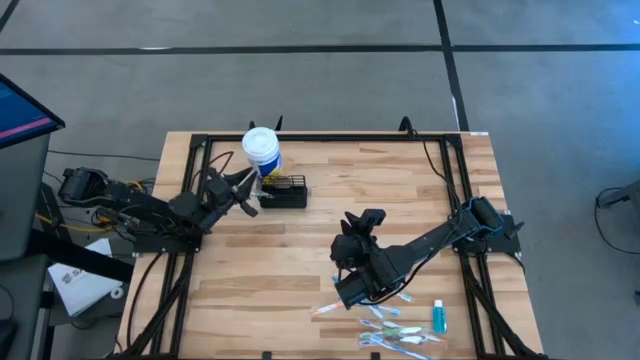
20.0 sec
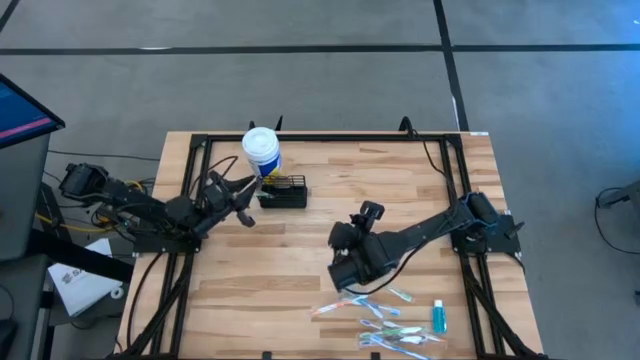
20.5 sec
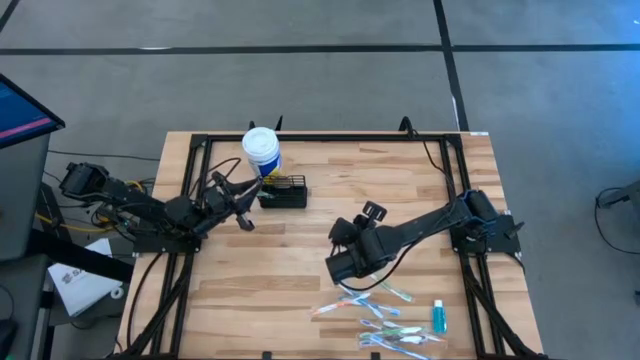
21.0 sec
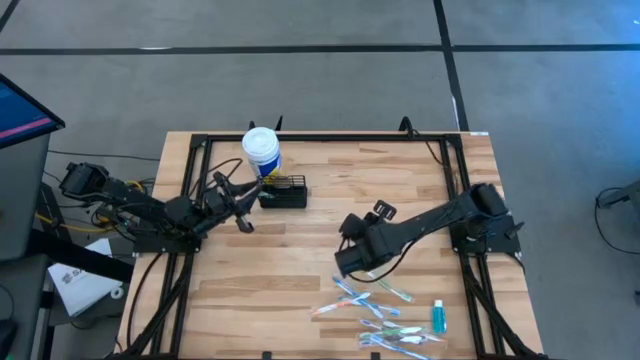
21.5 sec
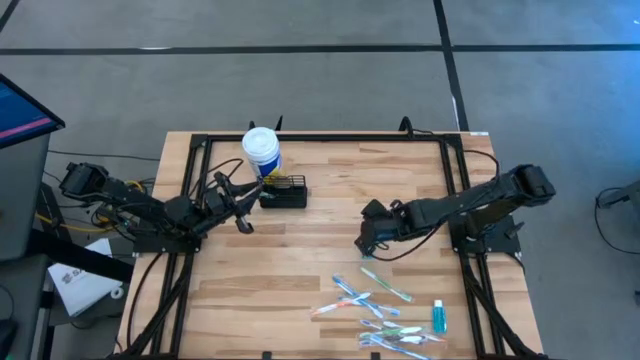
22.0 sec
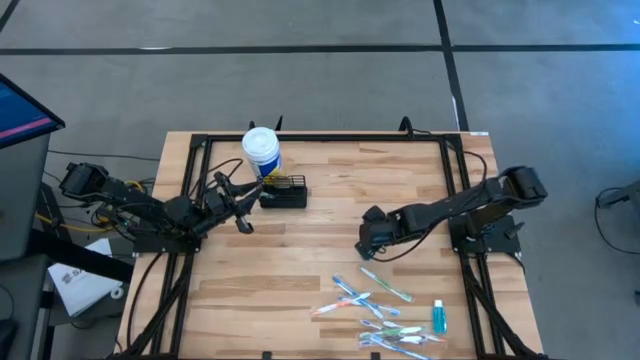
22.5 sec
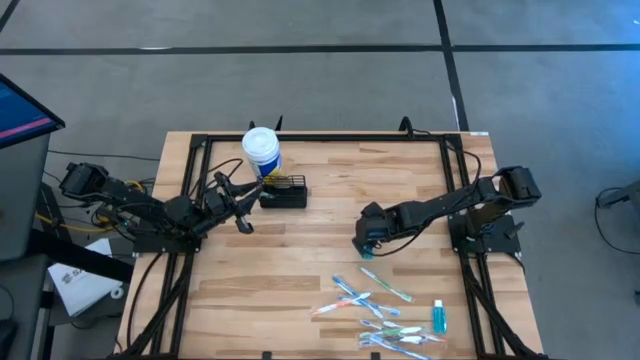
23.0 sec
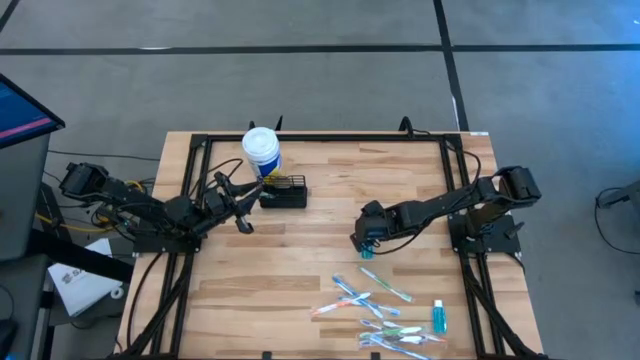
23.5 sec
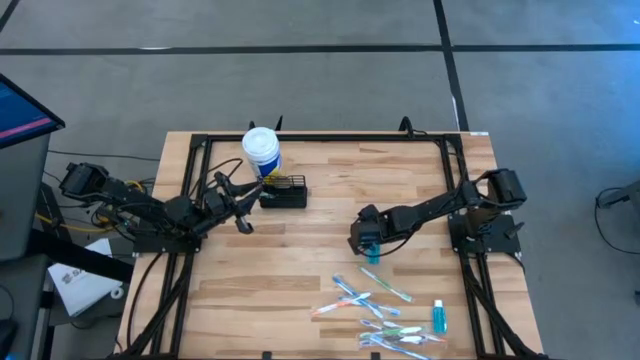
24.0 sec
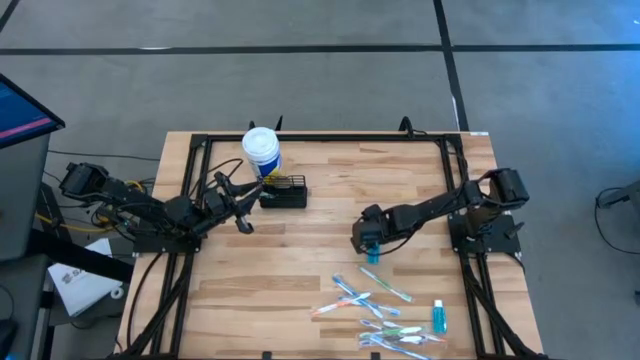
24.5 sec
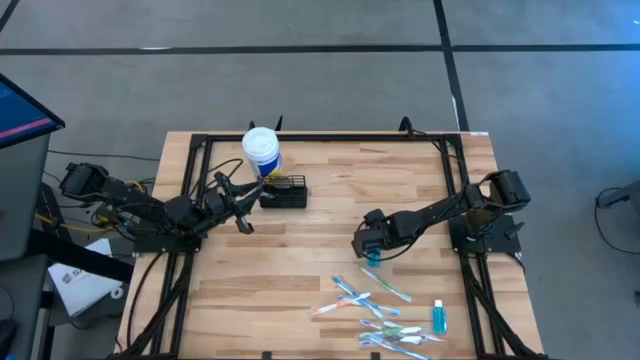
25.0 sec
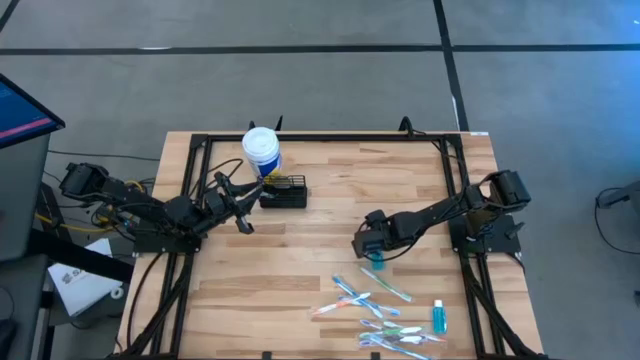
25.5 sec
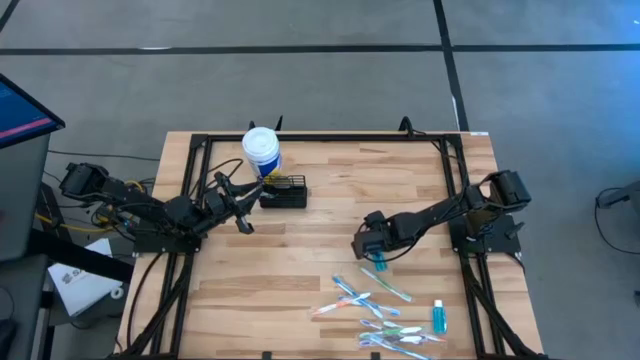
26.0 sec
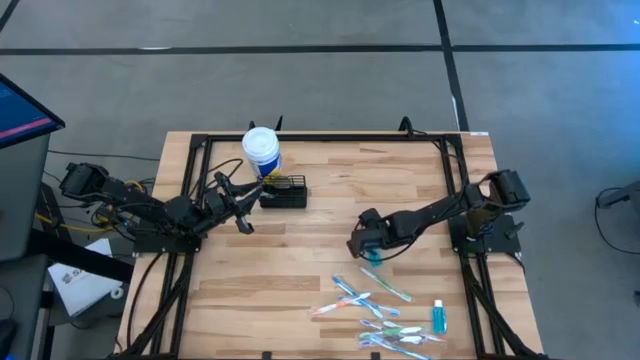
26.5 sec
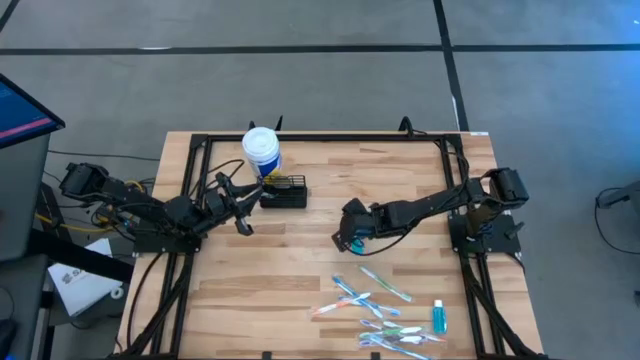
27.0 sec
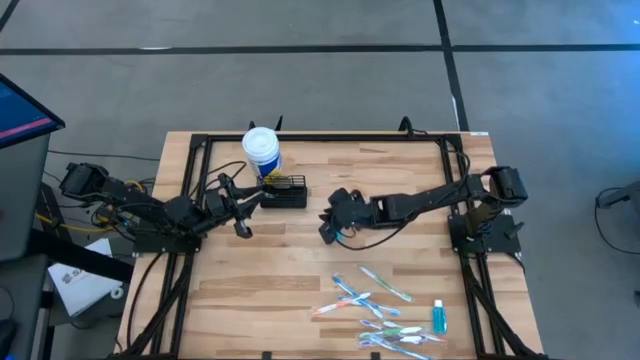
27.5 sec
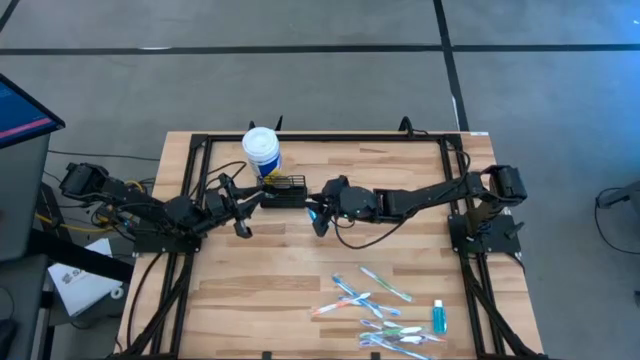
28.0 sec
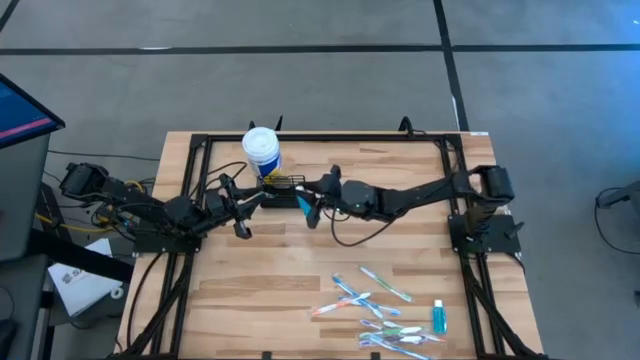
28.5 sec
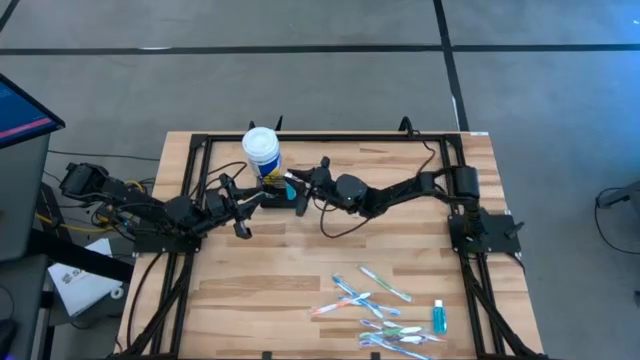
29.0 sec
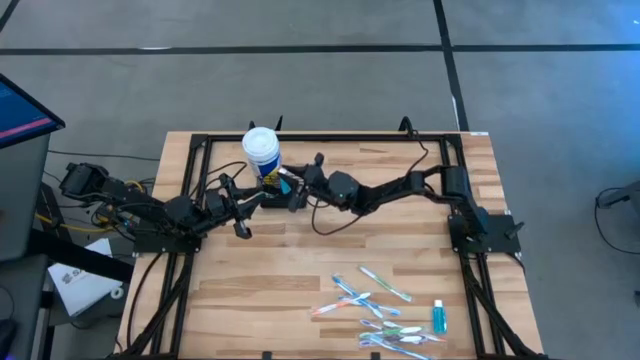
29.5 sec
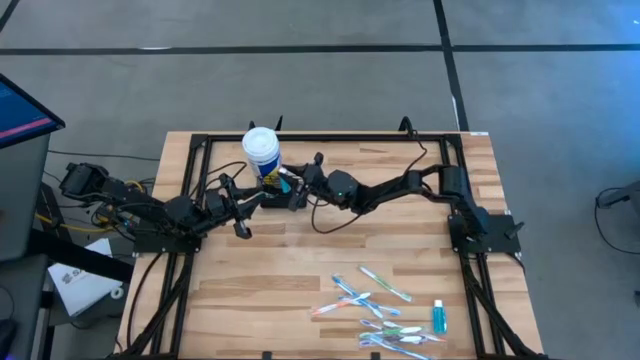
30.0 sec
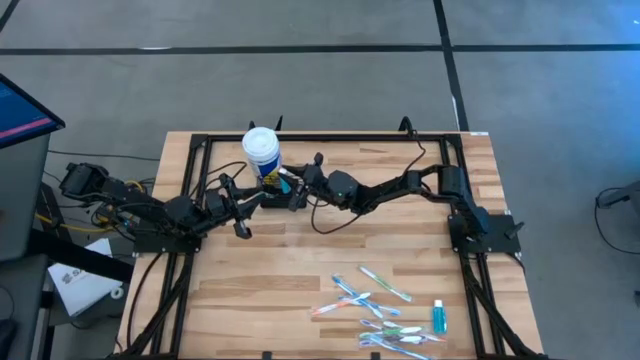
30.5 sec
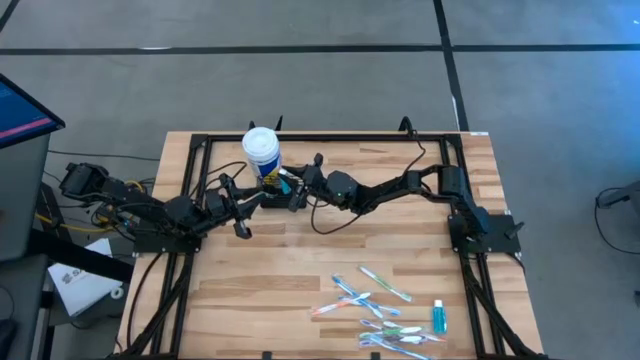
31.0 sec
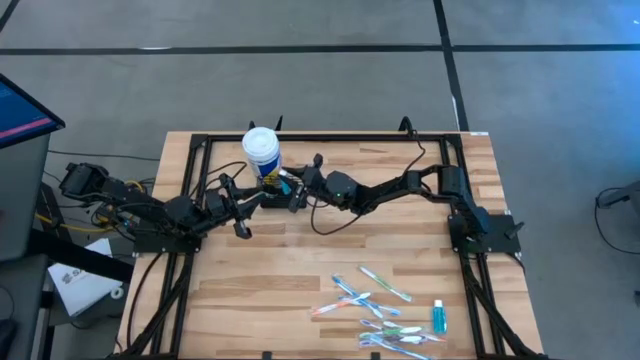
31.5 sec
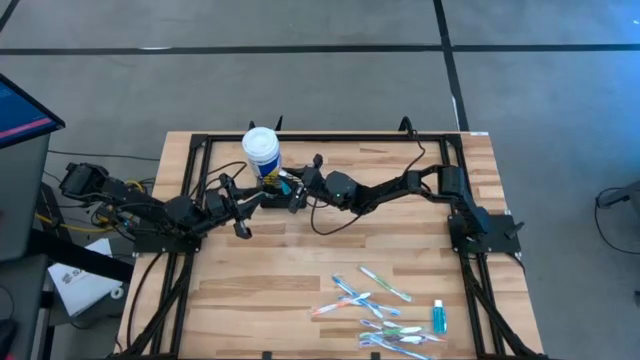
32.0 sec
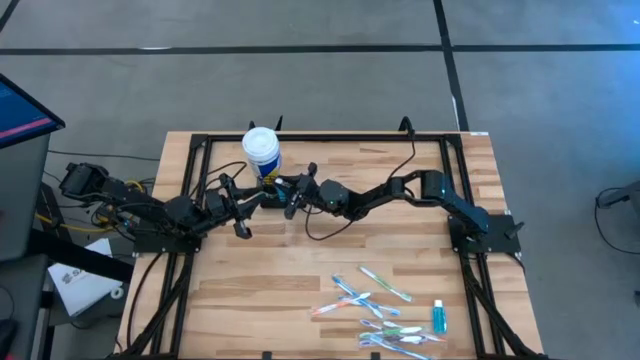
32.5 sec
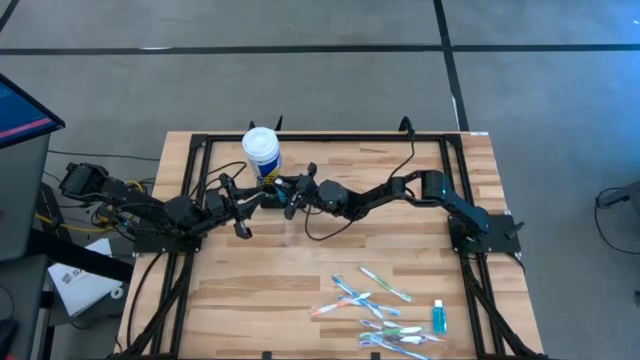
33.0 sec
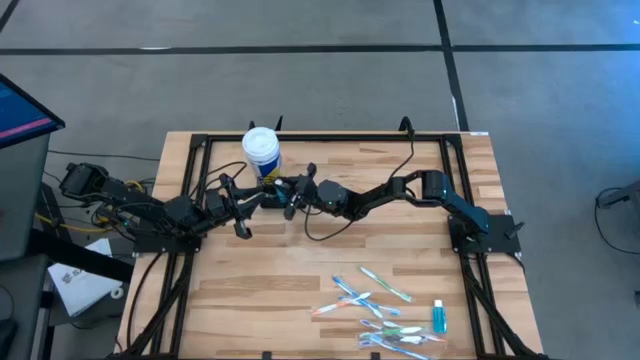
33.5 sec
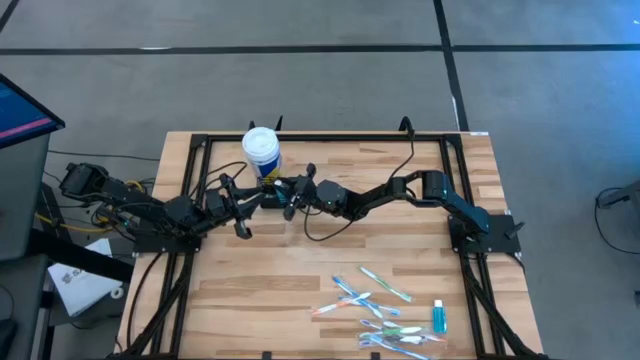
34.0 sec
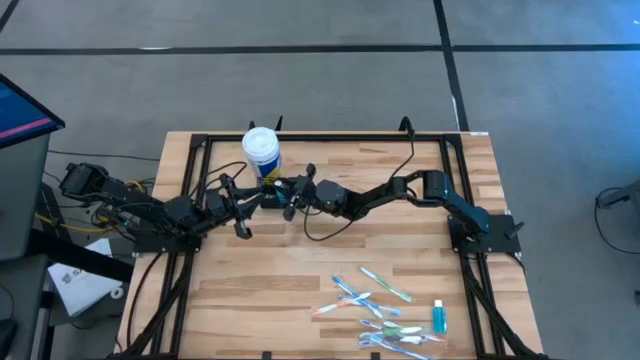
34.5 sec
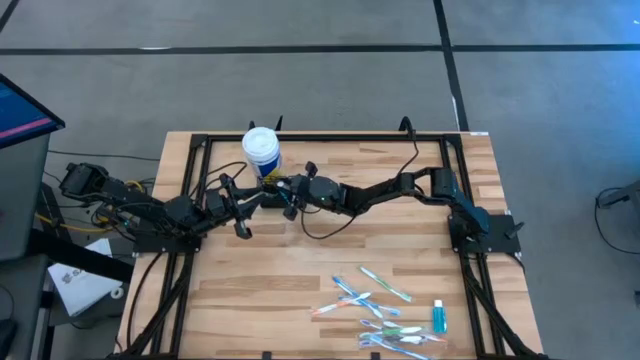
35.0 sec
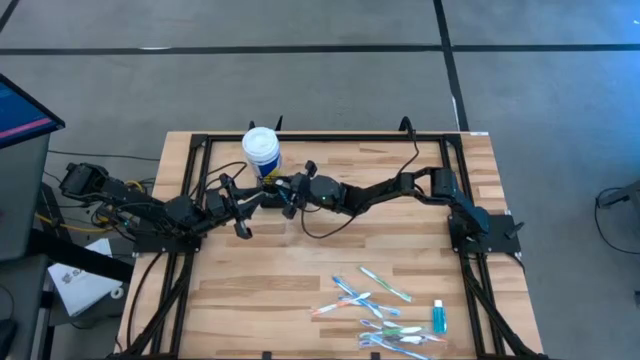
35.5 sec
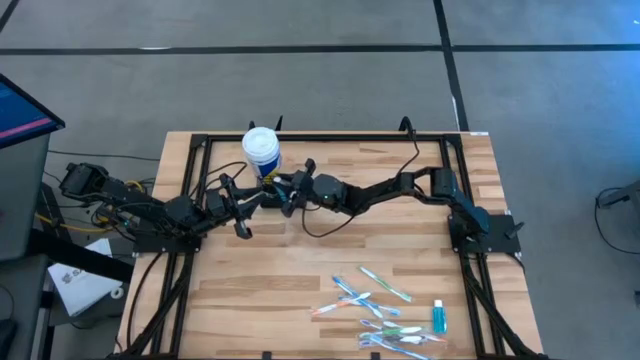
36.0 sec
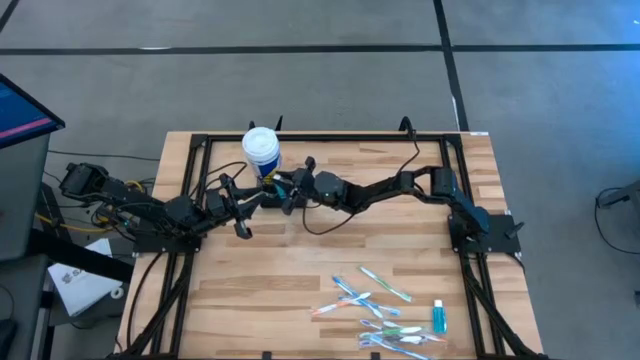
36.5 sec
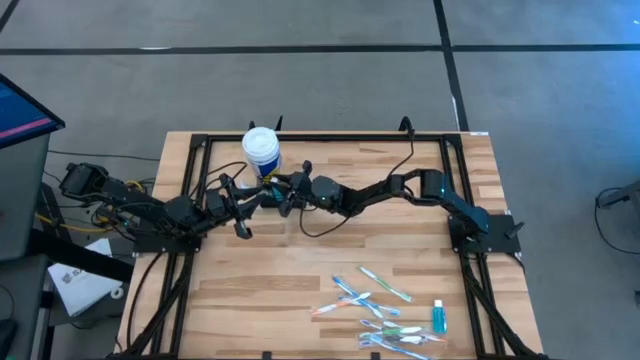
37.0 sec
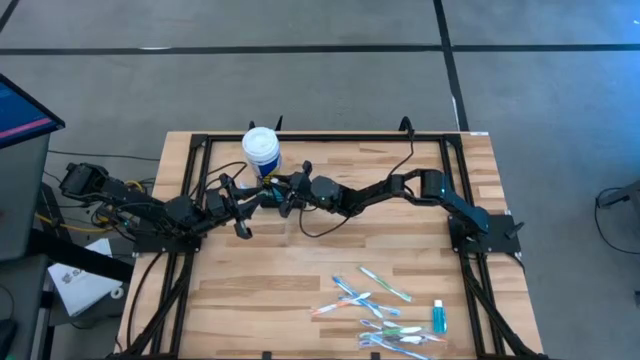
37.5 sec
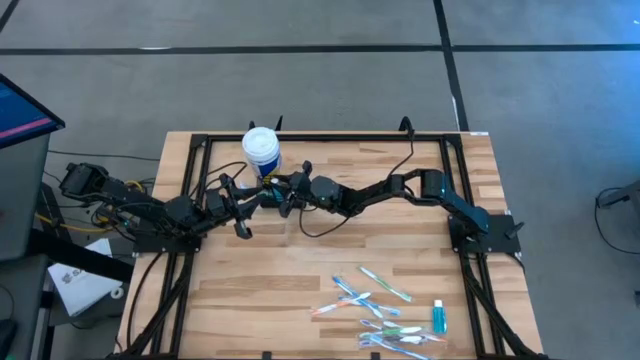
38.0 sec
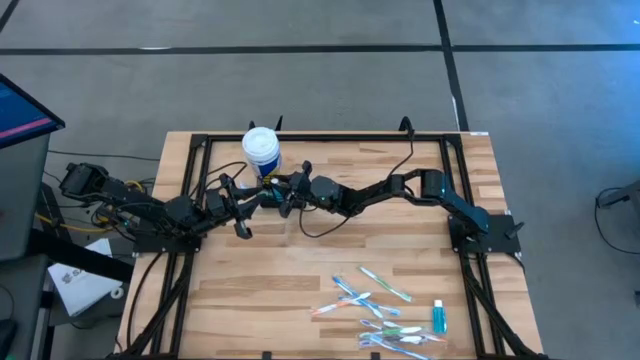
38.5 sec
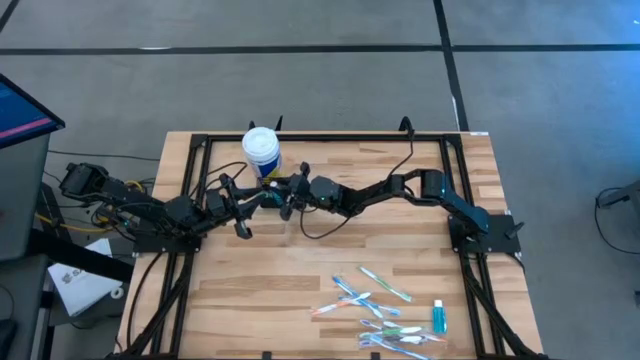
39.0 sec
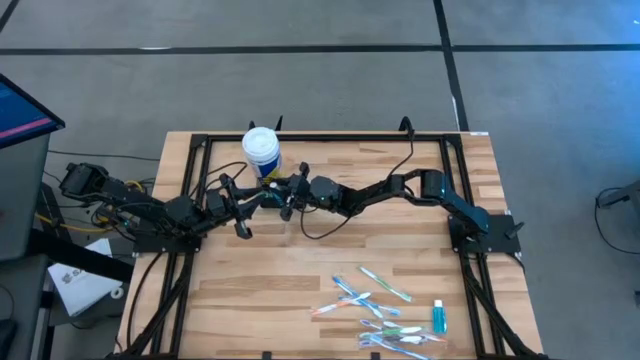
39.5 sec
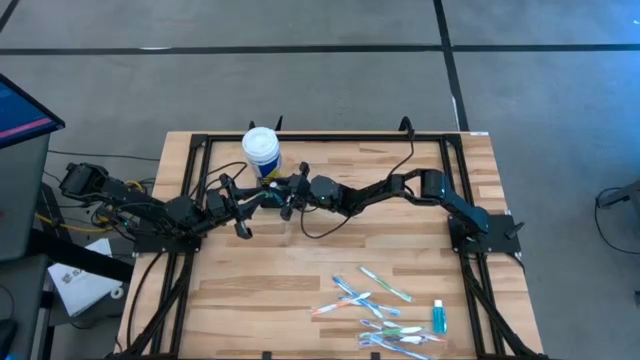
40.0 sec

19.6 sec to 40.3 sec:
Task: Pick & Place toothbrushing station
Put the mouthwash bottle into the wire organizer

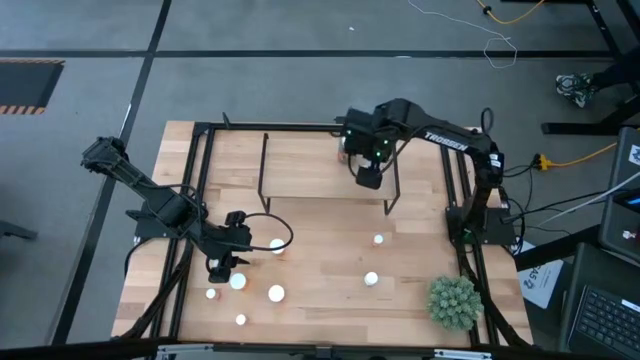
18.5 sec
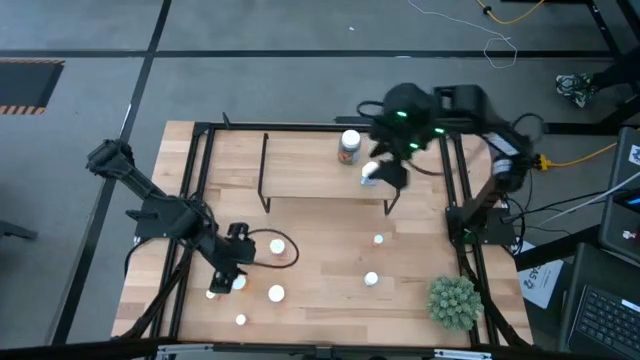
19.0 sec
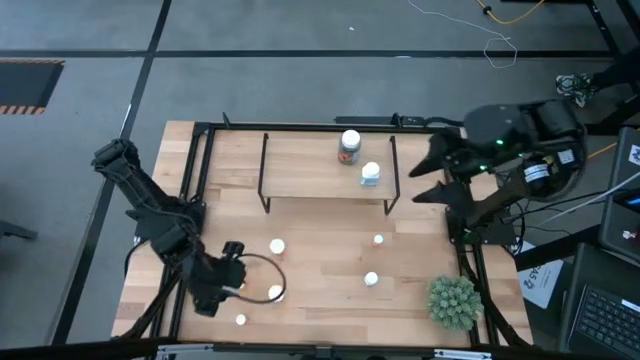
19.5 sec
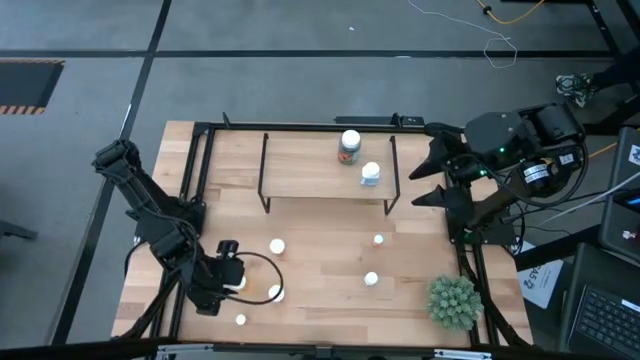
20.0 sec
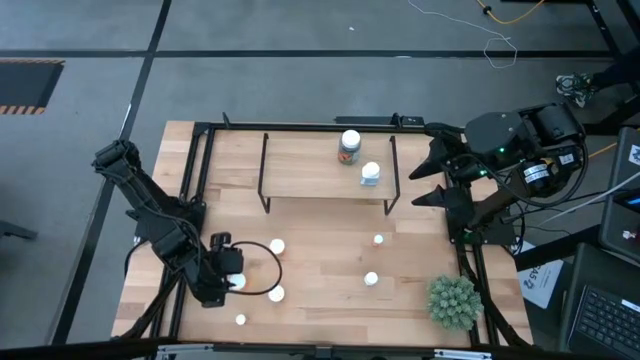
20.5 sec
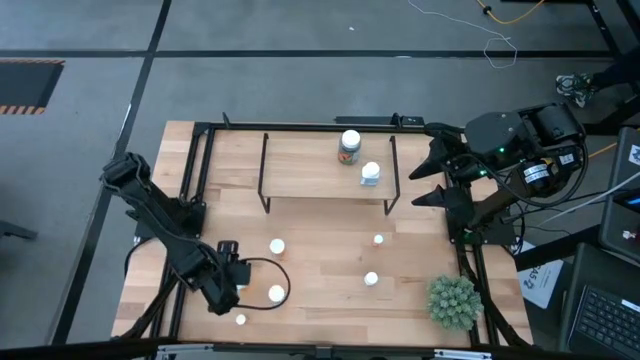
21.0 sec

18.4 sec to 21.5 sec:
Task: Pick and place medicine bottles onto shelf by color
Put the top left orange pill bottle on the shelf
